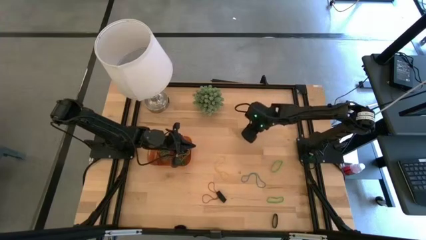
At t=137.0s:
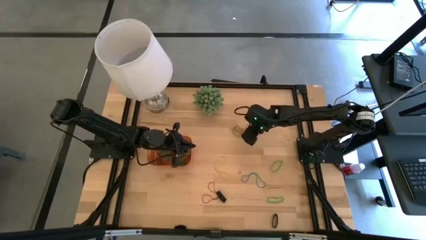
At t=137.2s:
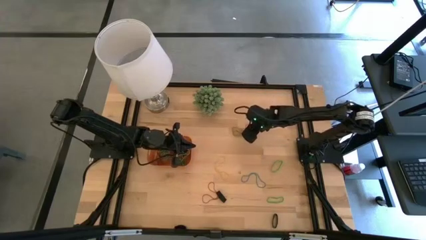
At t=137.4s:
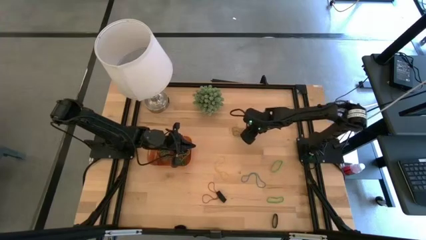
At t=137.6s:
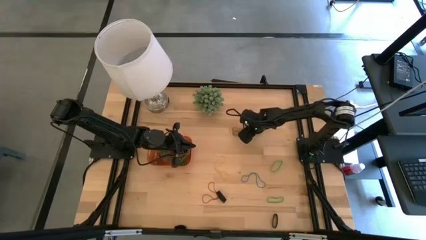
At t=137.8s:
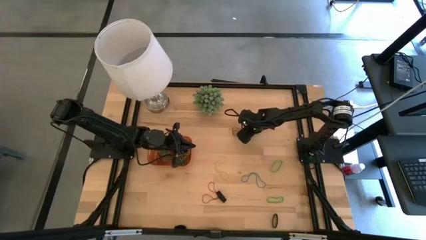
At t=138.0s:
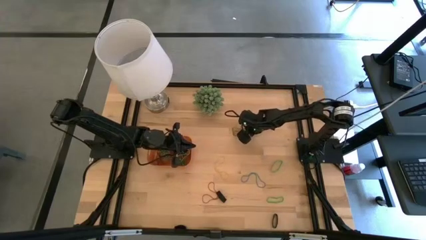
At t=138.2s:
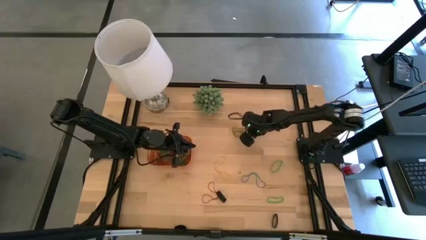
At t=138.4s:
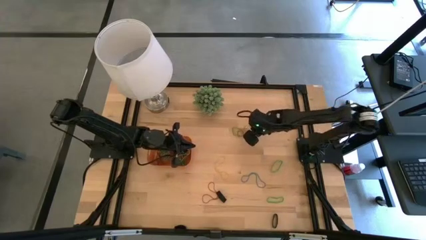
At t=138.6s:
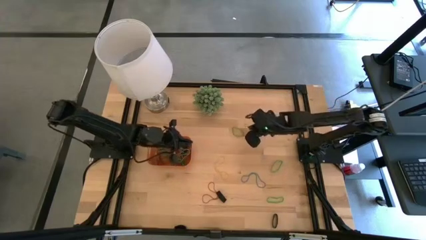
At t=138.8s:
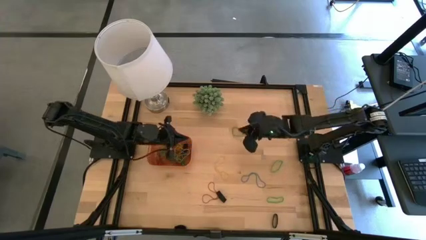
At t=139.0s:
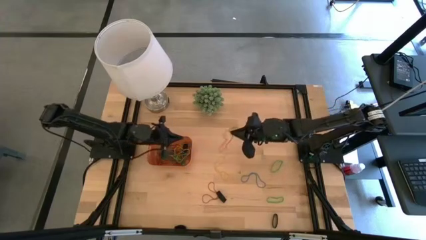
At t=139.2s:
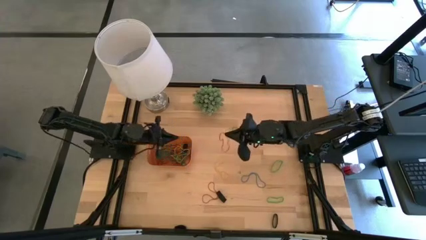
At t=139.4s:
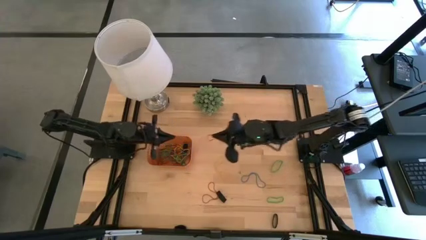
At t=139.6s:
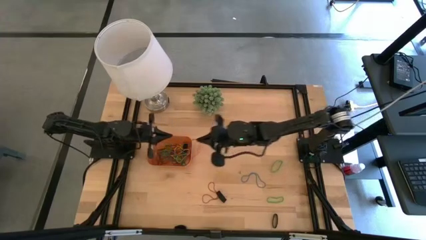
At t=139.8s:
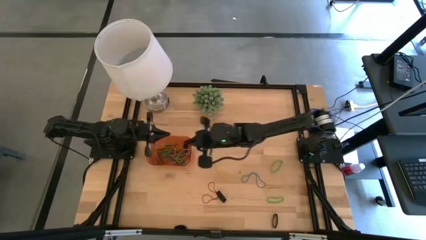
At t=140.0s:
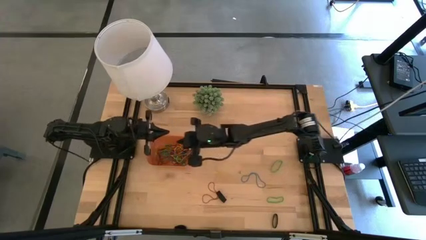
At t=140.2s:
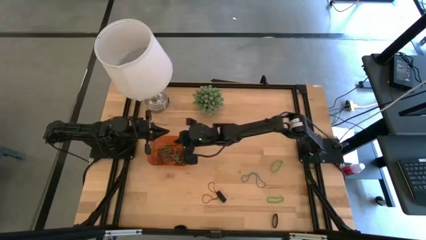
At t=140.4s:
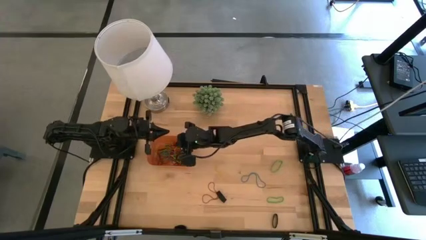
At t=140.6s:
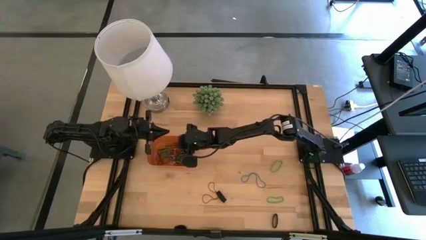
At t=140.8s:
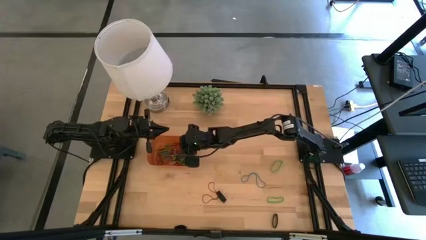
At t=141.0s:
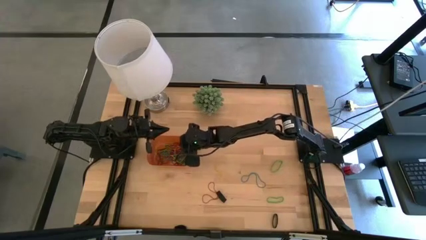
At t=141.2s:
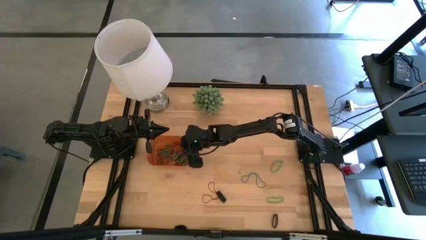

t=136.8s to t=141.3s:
Task: Pick and place rubber bands into bin
Put the red rubber band into the orange bin

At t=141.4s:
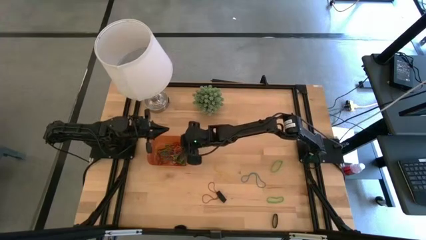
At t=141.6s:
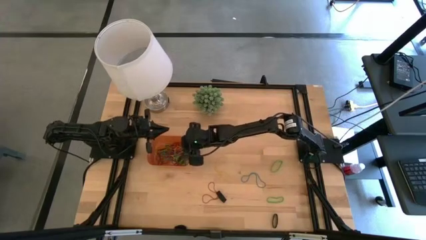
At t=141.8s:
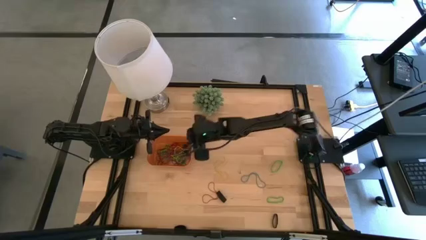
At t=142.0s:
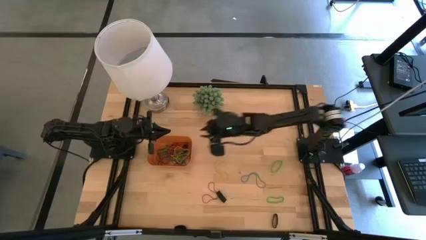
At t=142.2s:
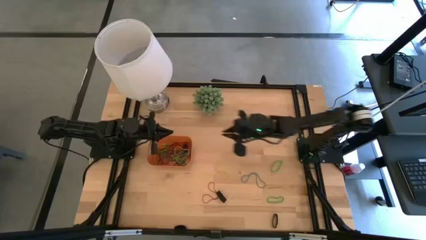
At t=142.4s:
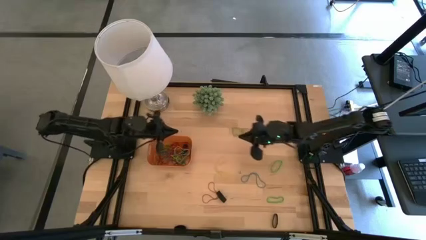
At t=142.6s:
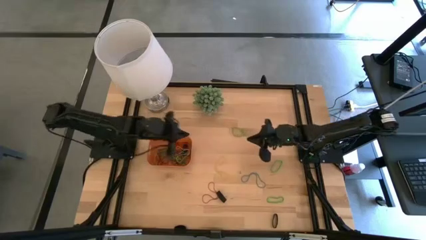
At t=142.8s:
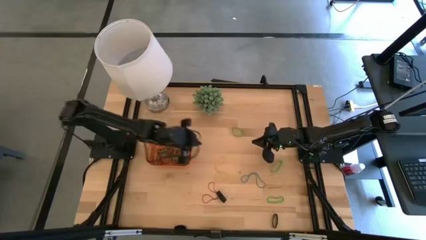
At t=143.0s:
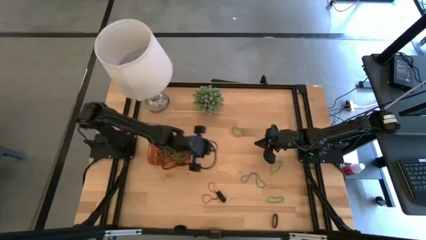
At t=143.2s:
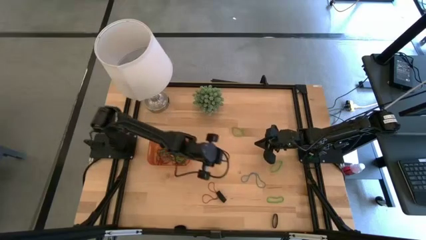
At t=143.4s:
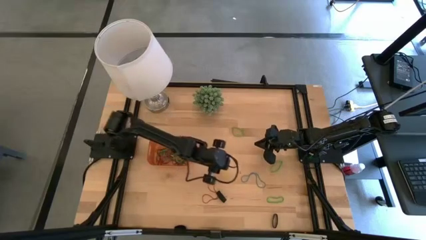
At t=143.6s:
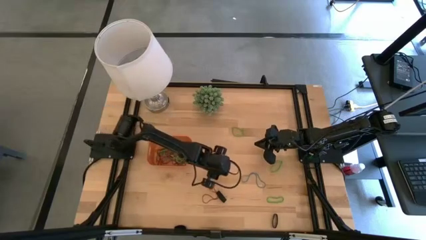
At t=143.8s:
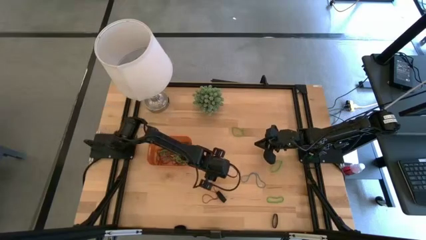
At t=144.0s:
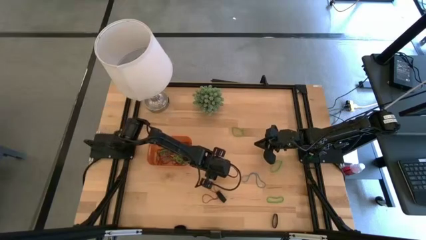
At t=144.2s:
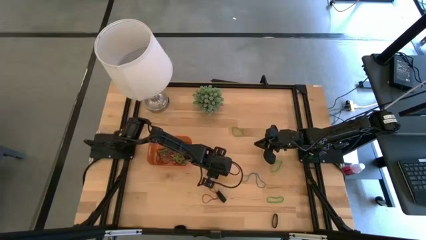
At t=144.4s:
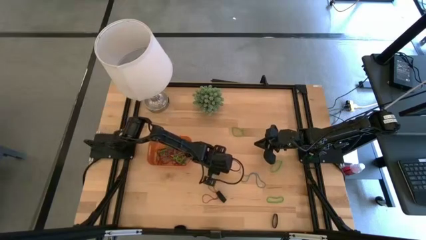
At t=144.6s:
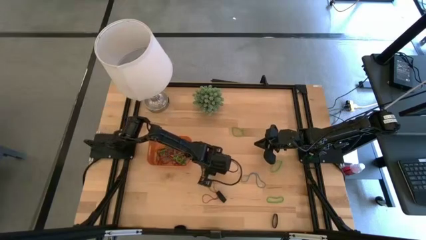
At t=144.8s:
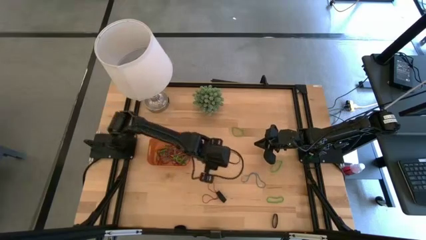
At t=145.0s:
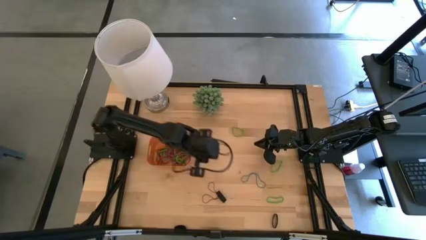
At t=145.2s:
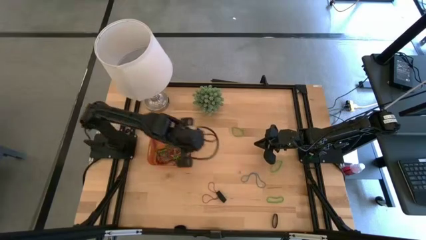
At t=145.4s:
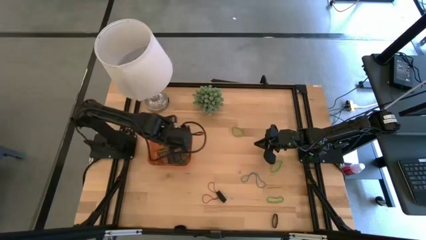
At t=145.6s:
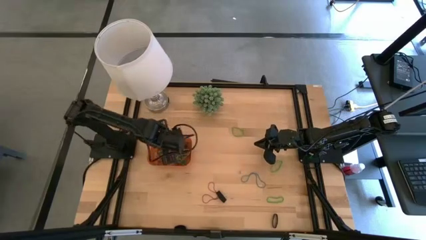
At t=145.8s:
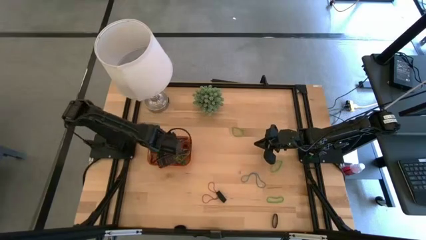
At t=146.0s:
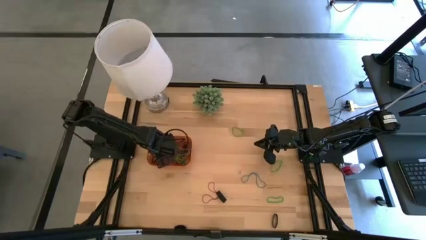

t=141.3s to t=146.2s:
Put the yellow rubber band into the orange bin

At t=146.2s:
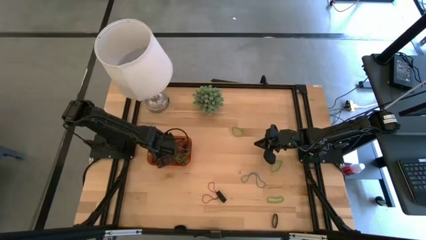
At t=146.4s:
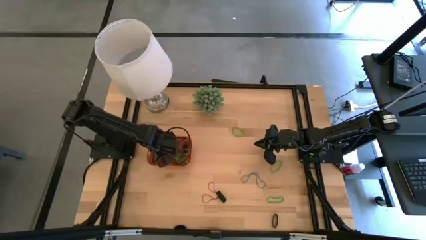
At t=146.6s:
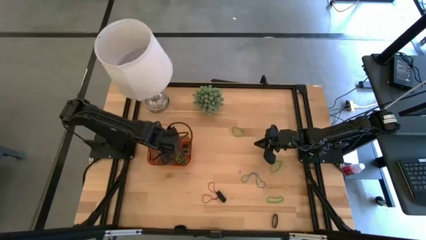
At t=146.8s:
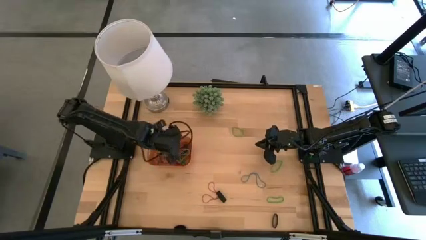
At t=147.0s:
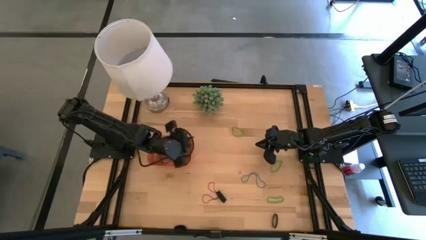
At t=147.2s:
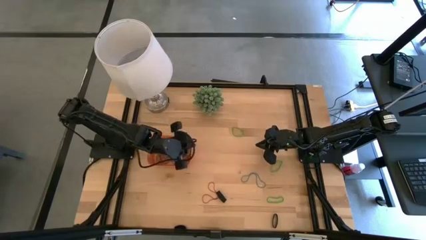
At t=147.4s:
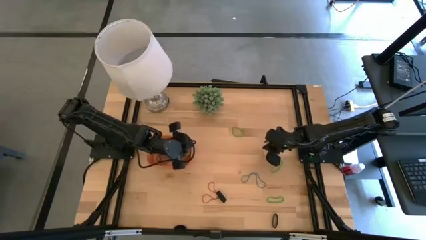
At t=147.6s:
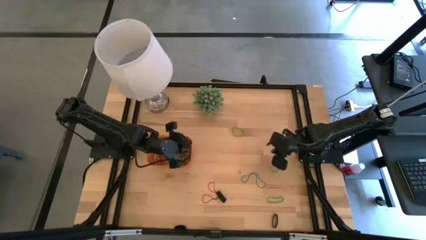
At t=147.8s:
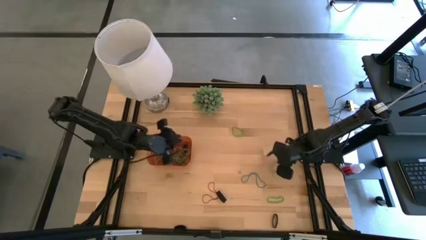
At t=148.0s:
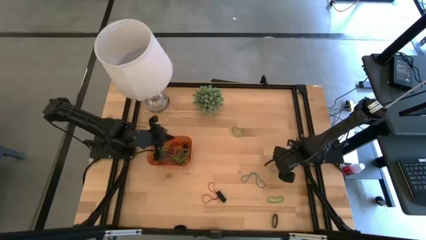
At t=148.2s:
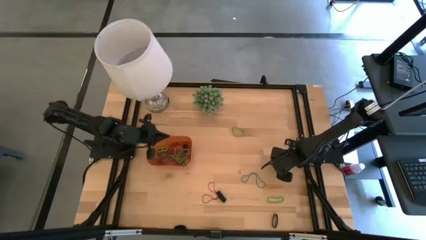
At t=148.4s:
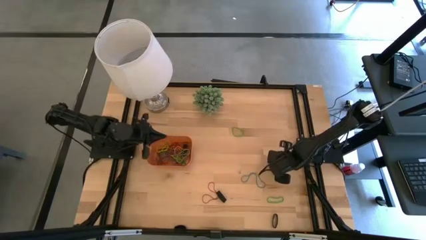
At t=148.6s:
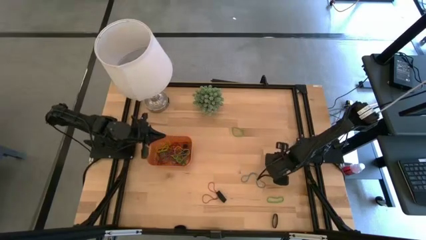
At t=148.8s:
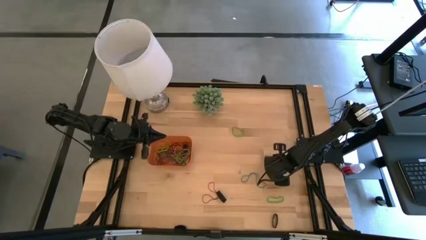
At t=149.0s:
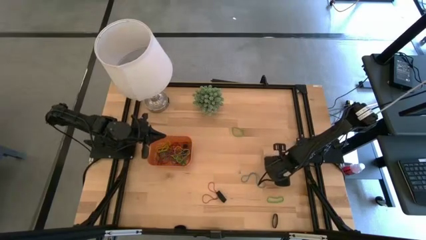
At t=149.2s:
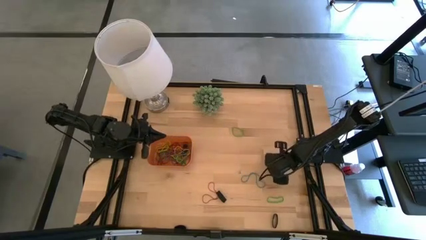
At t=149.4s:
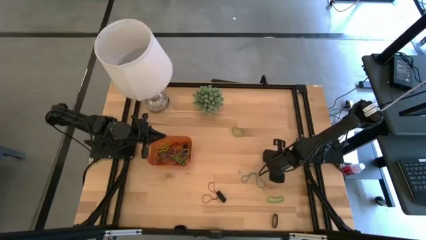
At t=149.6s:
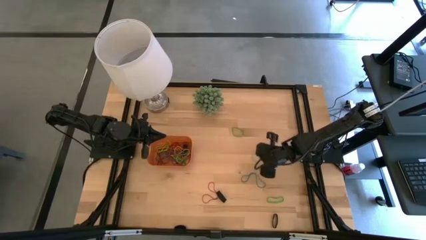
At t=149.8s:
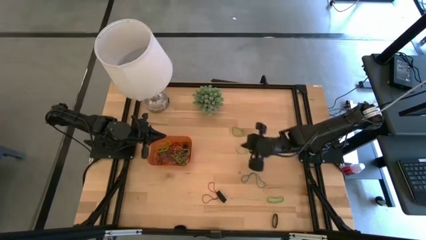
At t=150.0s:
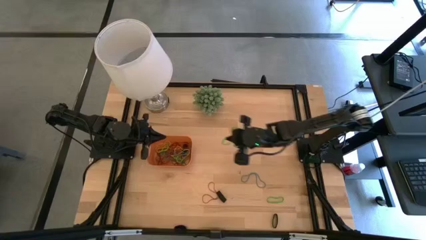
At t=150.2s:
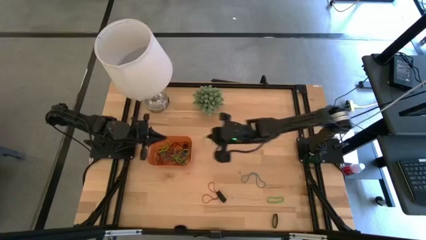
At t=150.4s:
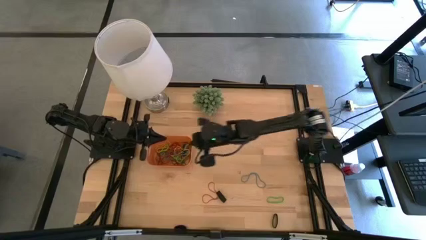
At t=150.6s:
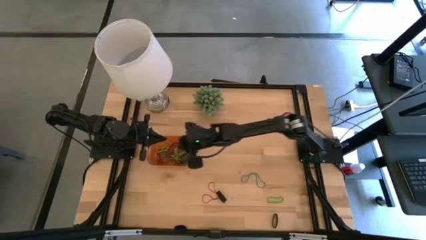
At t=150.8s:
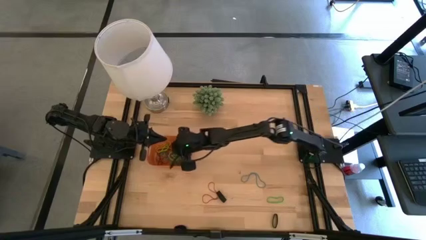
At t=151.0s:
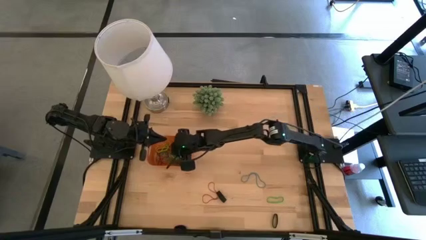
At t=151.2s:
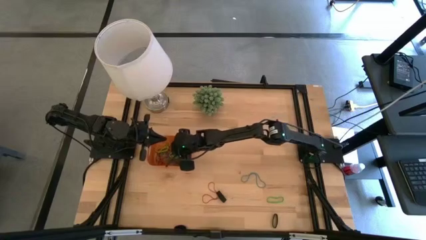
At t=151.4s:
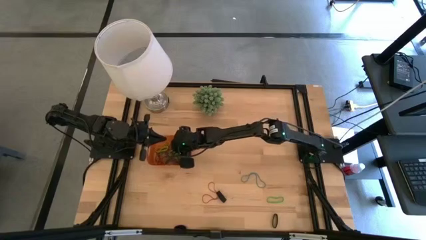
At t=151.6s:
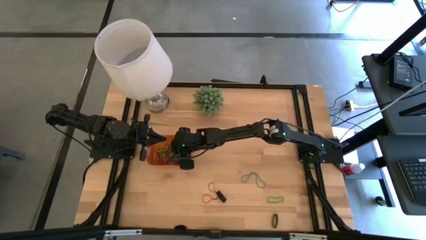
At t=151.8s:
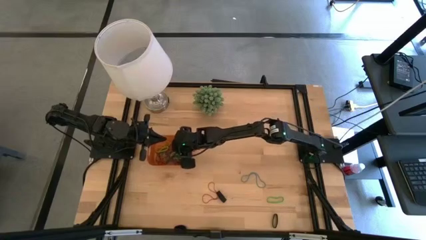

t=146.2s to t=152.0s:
Put the green rubber band into the orange bin

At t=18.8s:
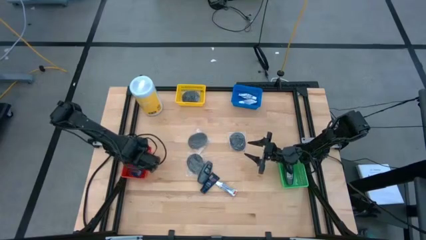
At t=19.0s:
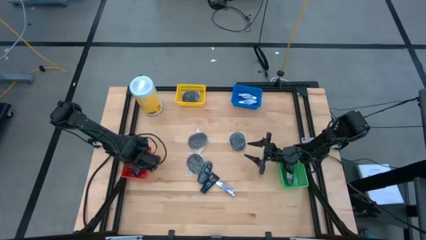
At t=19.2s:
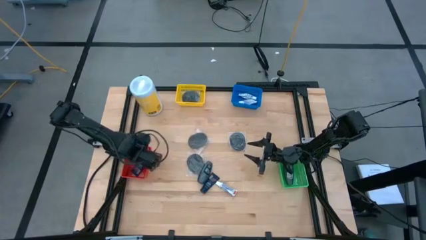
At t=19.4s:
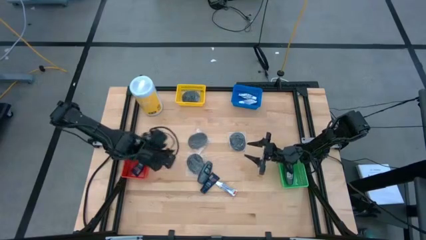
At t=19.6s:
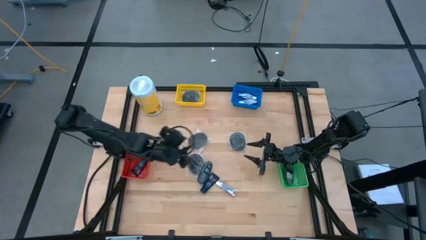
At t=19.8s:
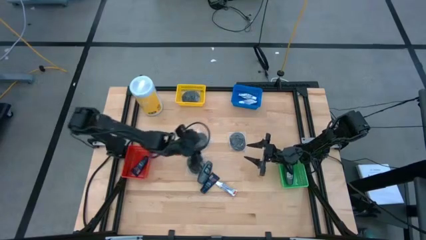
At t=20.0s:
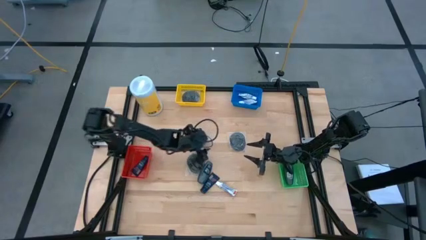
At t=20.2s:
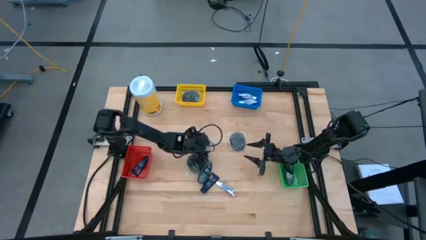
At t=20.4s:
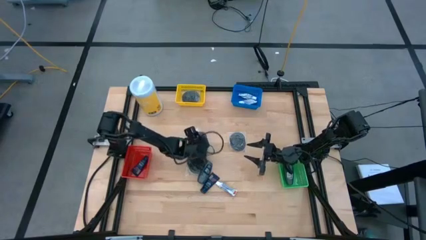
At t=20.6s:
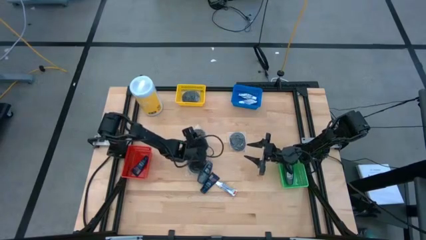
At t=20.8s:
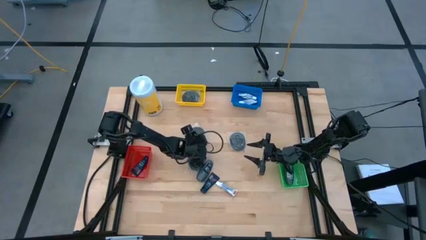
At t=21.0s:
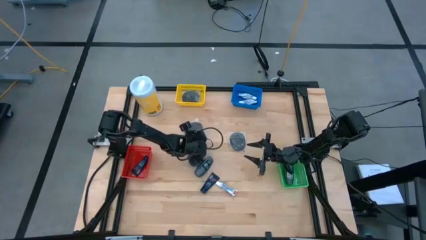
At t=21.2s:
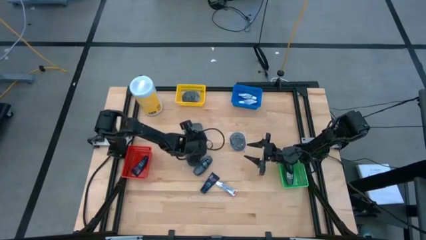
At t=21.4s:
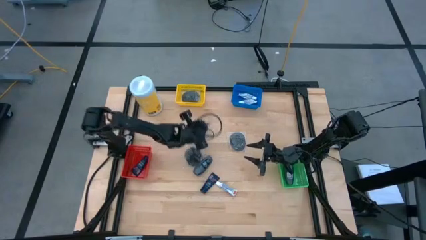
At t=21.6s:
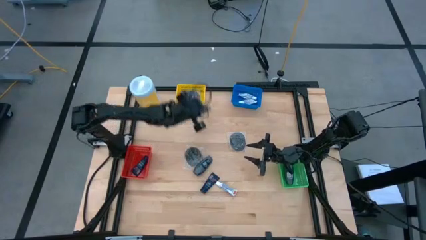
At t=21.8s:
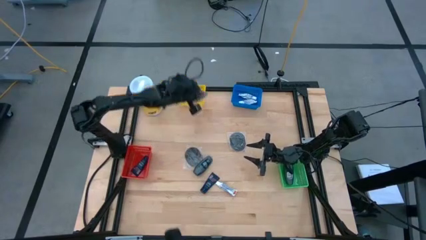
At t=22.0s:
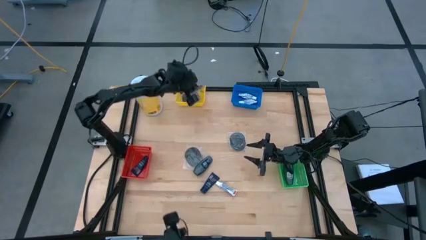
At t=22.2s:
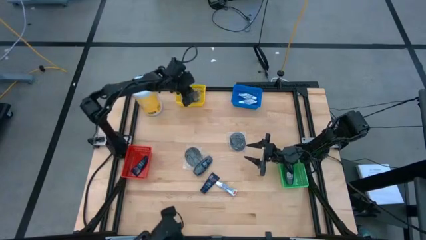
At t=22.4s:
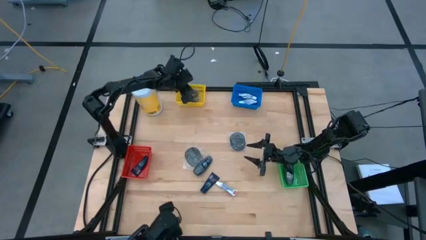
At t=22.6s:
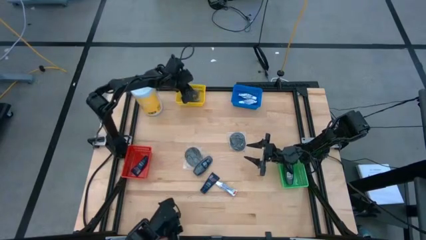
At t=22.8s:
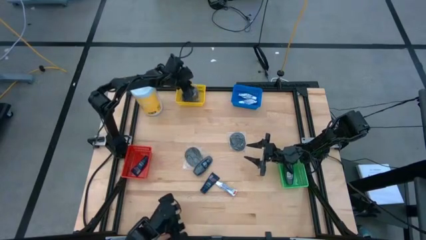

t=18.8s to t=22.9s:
Task: Pick & Place Travel size toiletries
Put the black hairbrush into the yellow bin
